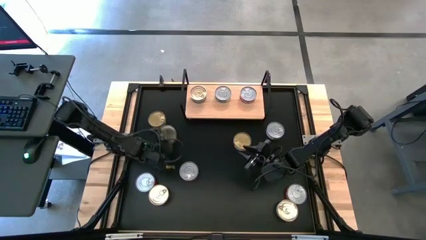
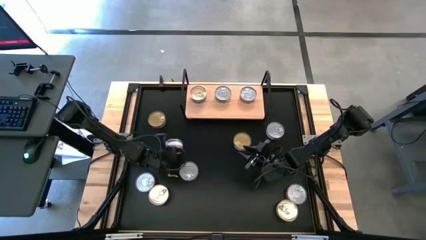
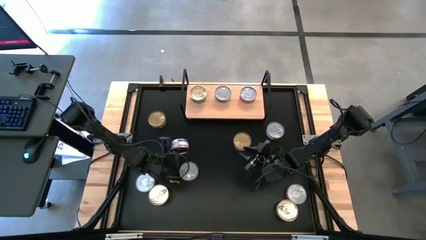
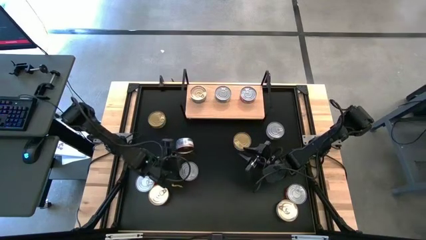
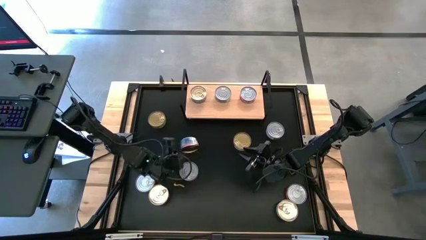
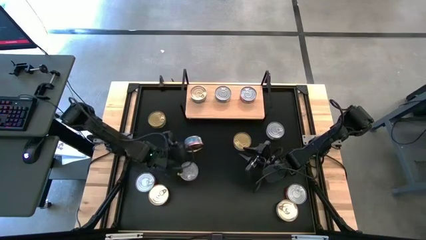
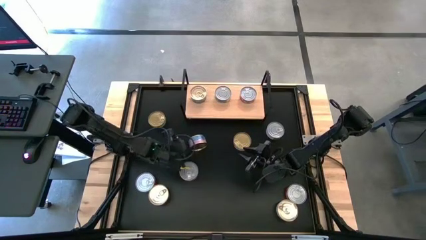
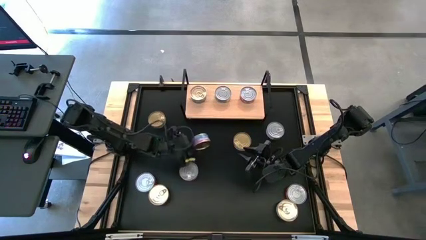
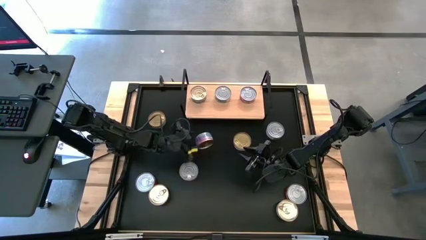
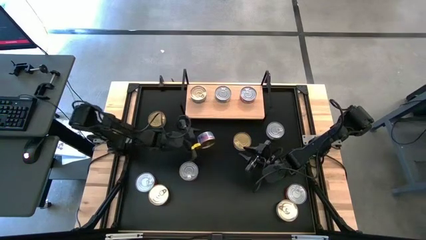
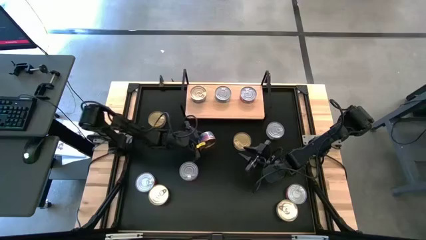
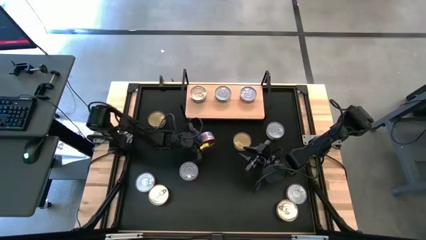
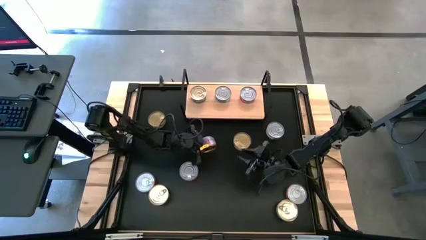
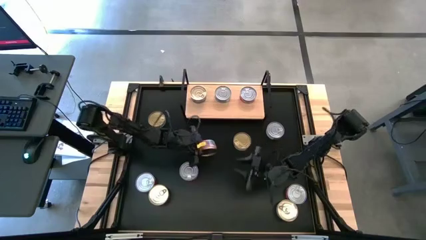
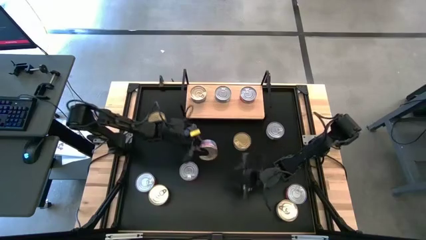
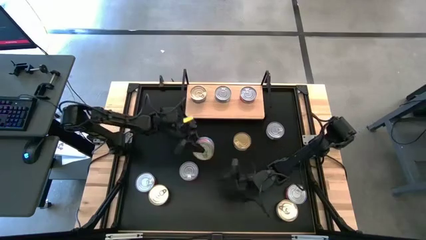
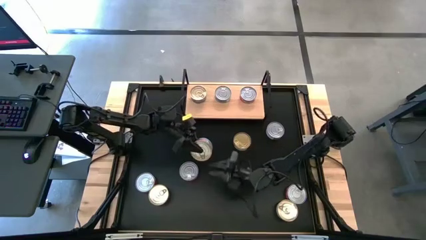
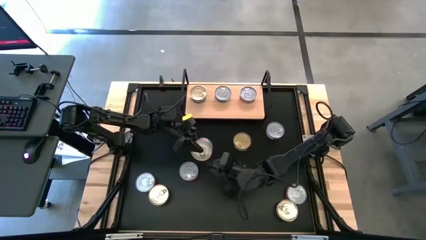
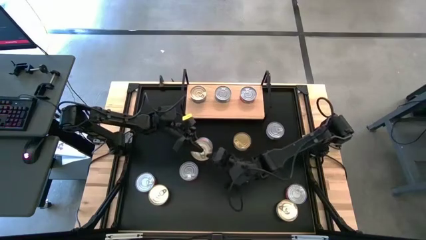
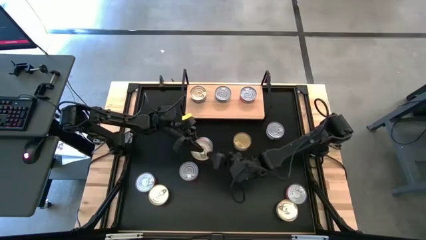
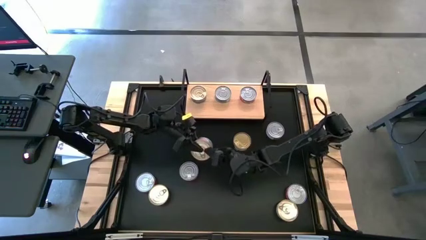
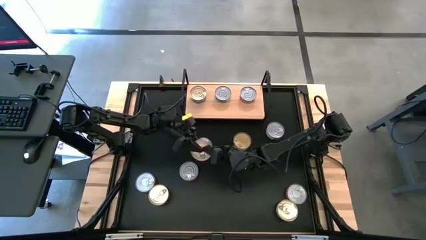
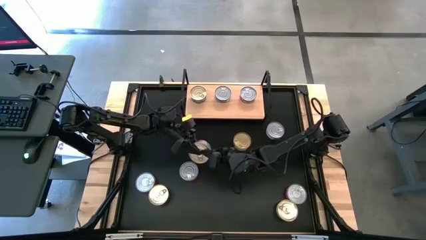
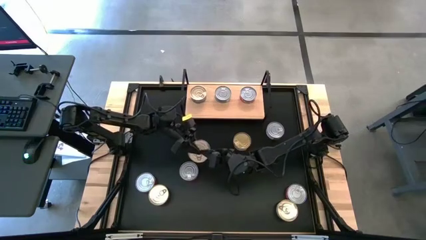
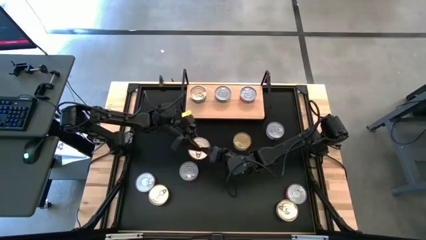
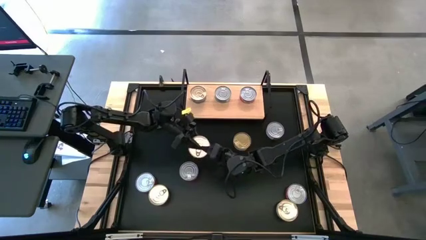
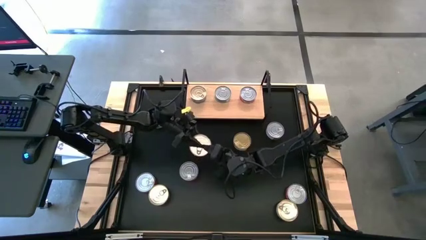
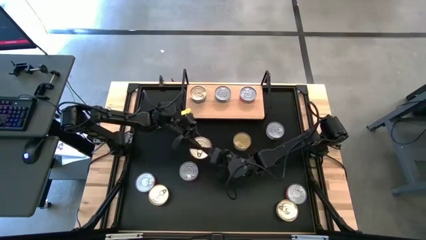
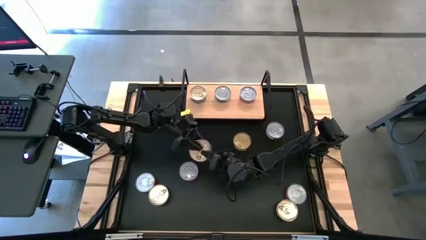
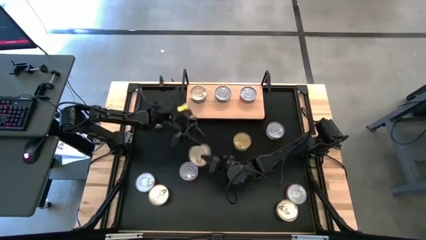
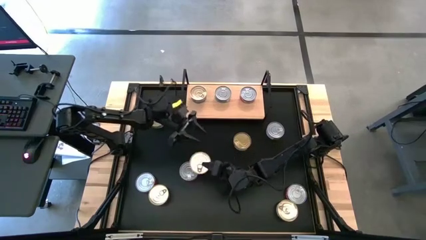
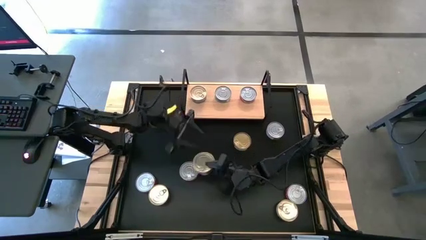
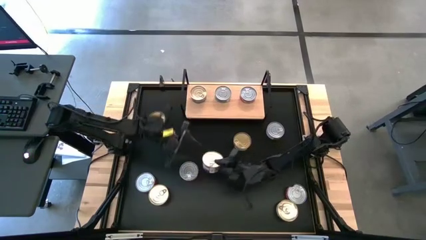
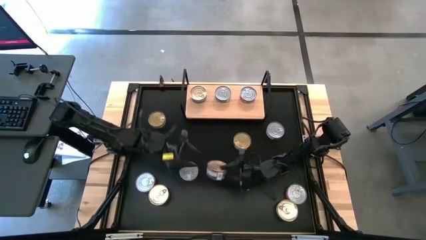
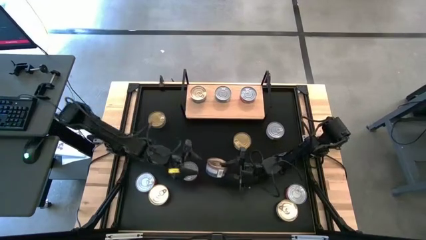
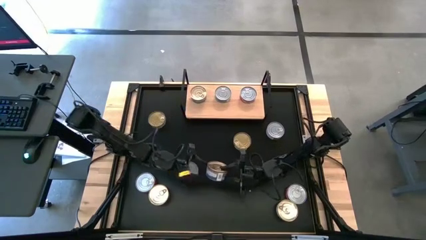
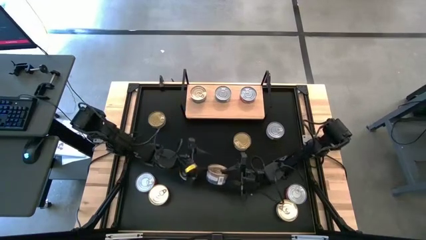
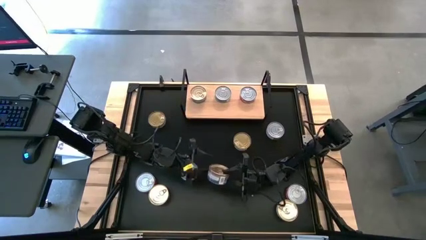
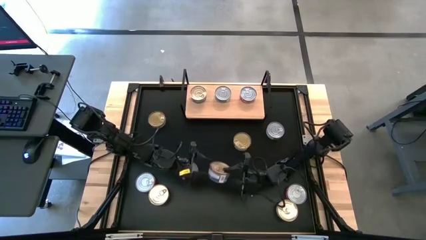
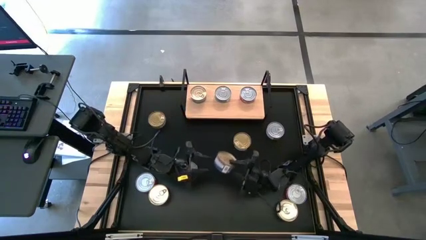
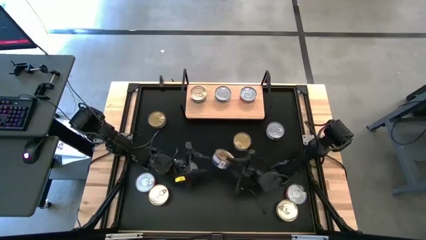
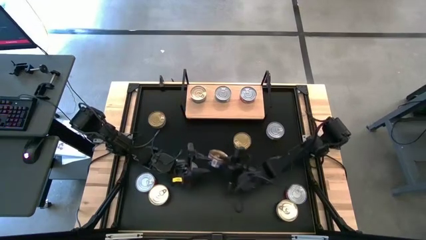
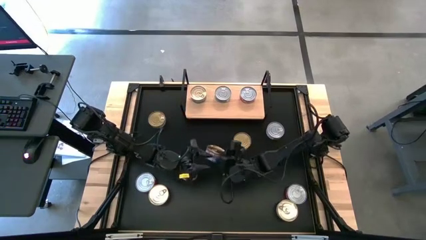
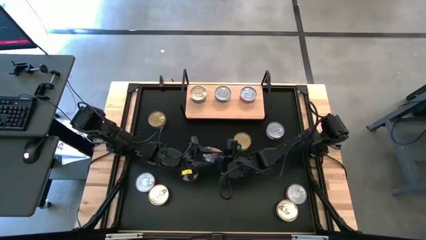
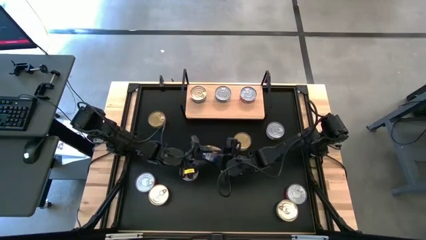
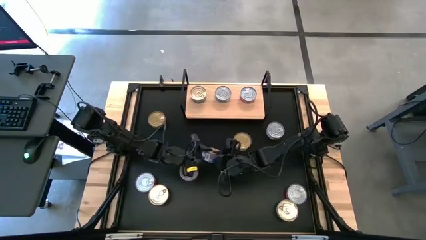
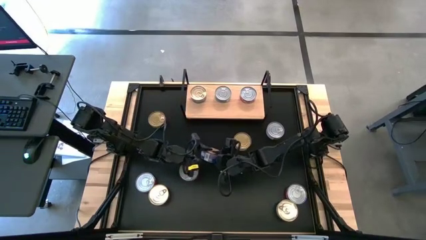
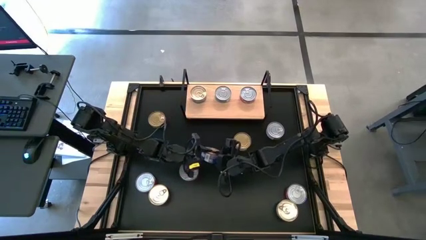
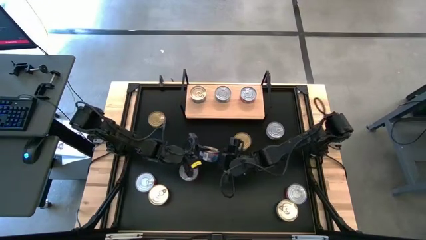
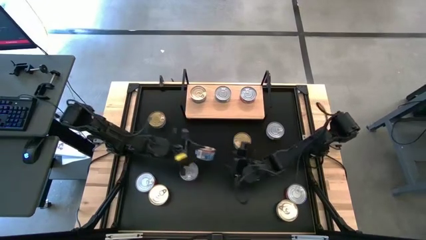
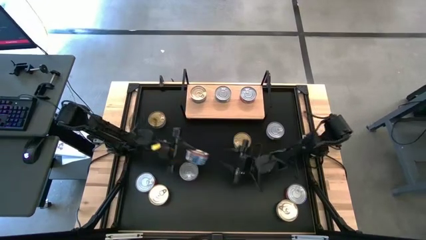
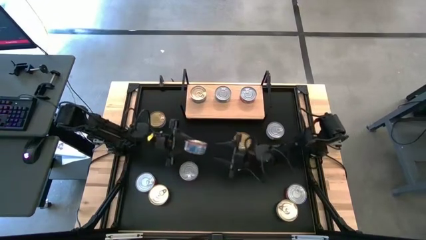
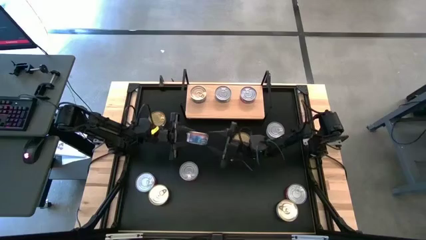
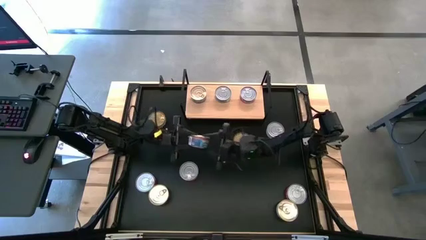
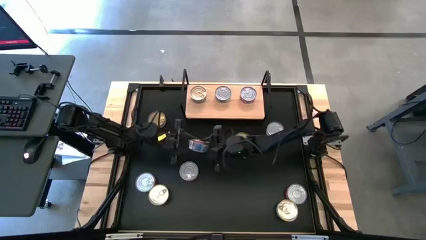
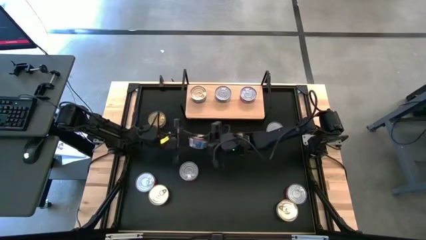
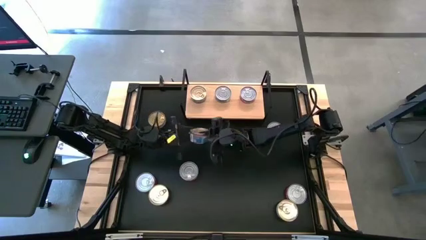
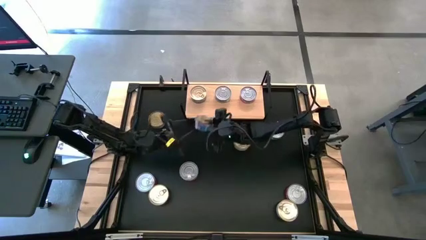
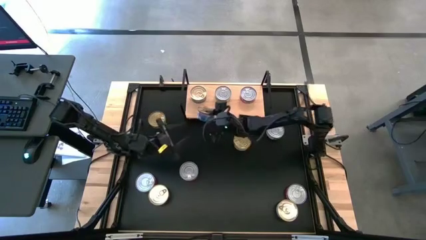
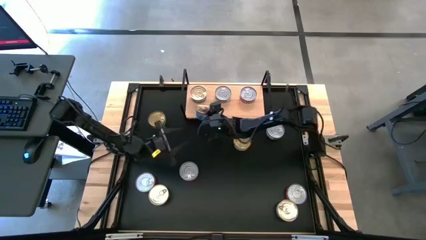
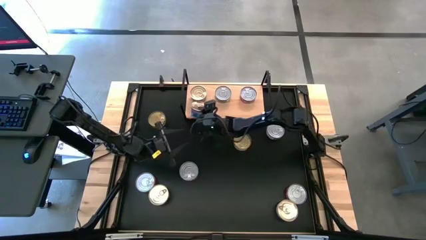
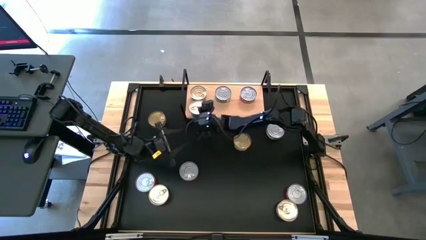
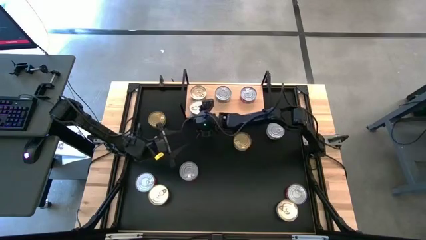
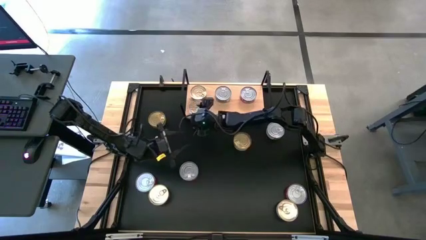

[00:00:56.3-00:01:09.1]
Task: Stack canned seafood by type on shelf
Put the top left blue canned tuna on the lower right shelf

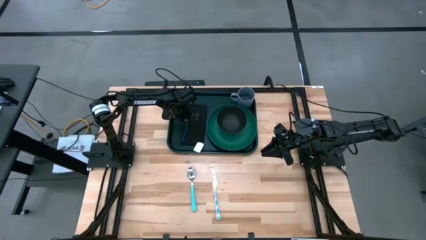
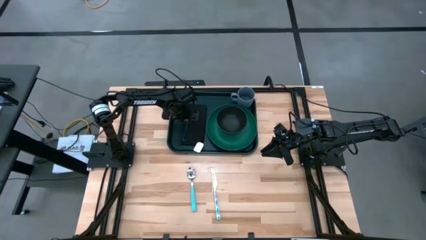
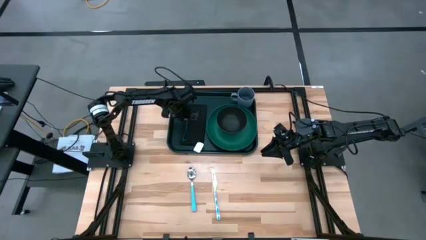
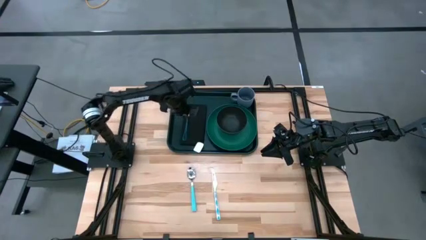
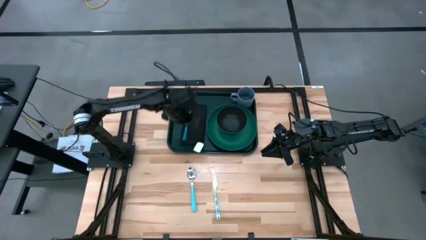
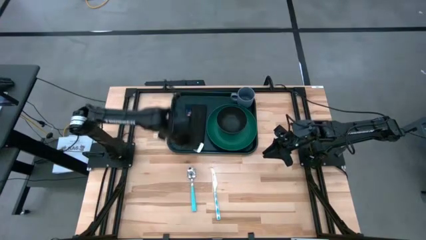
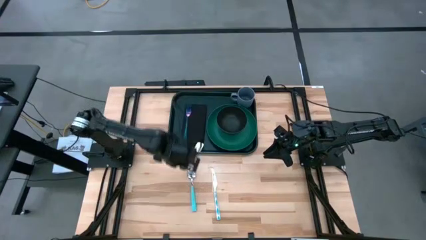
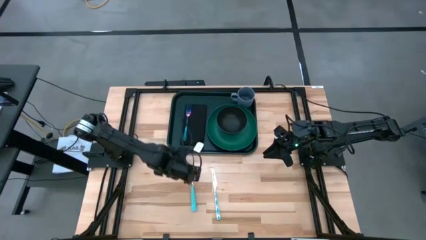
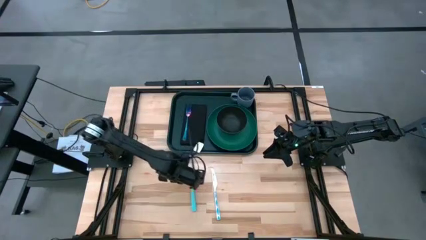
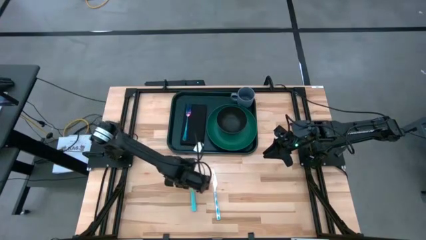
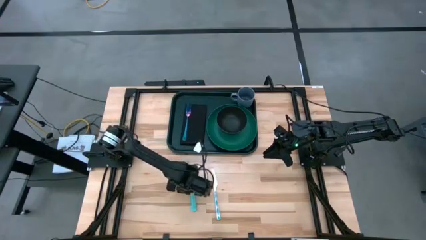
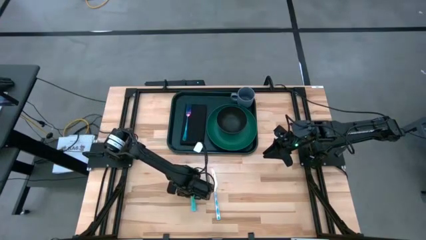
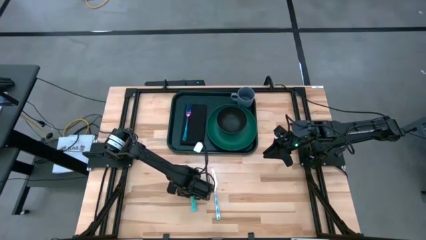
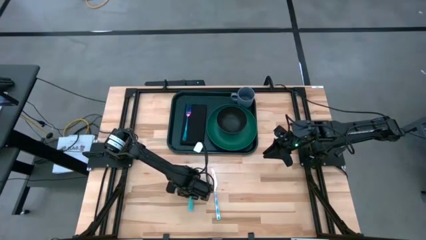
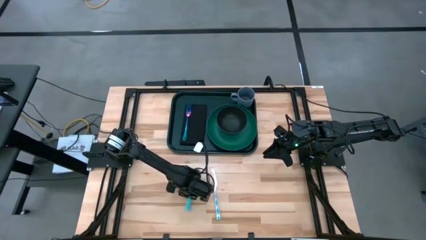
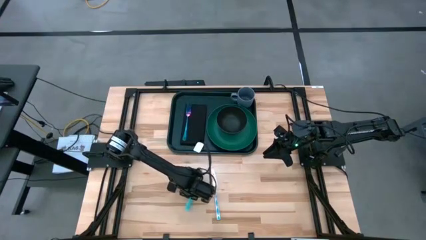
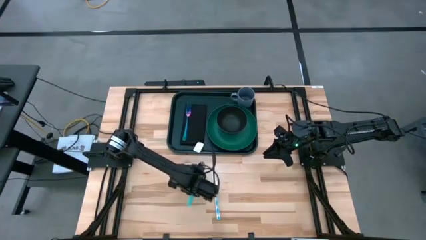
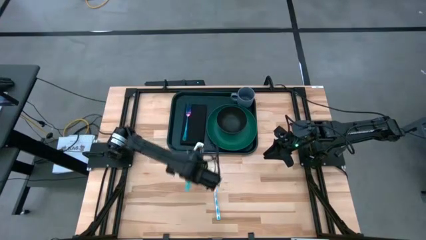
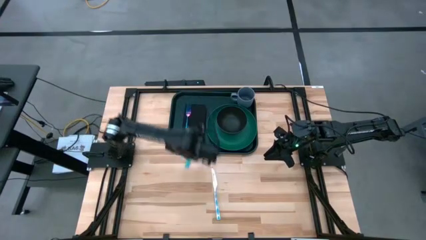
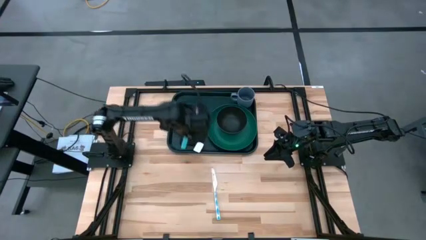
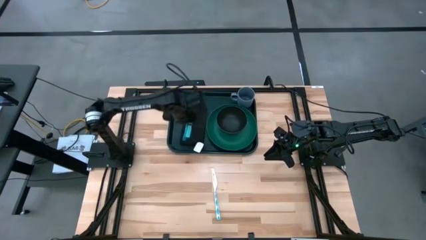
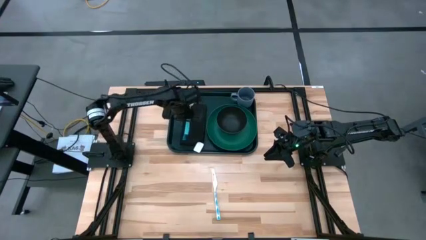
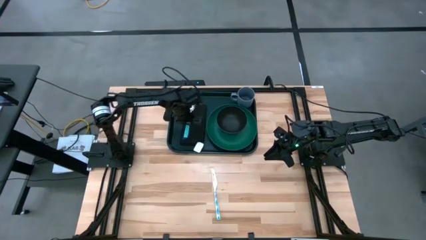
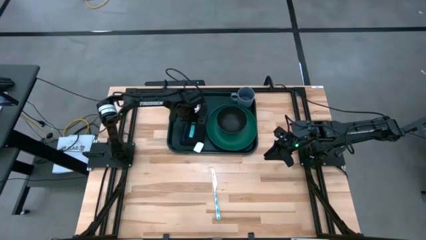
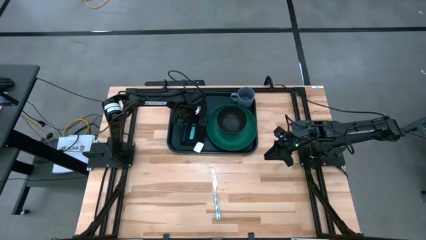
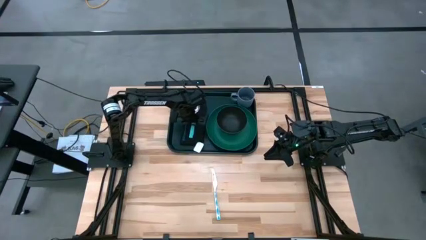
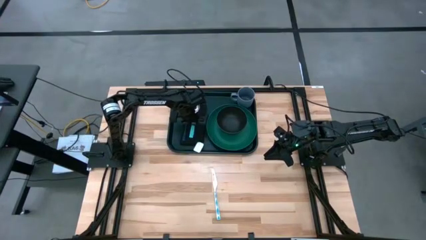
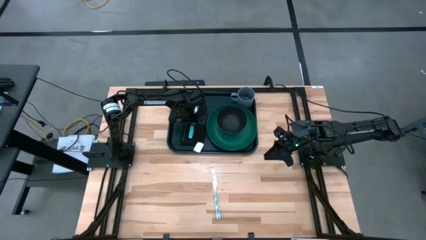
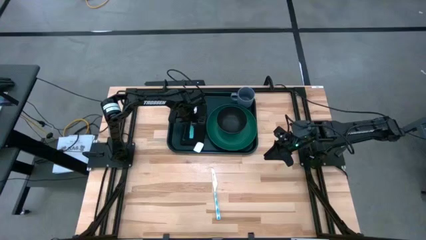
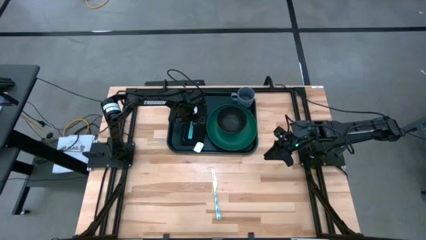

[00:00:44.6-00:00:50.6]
Task: Set up tray
Put the spoon on the black table napkin to the right of the fork
